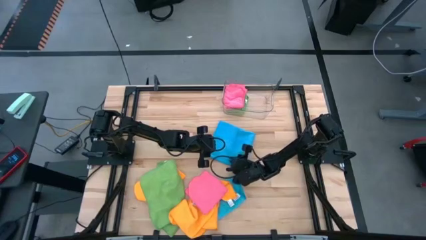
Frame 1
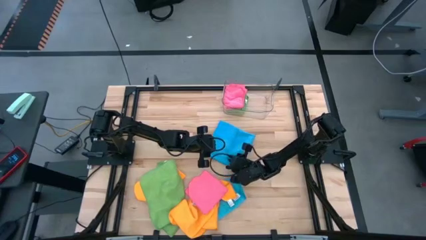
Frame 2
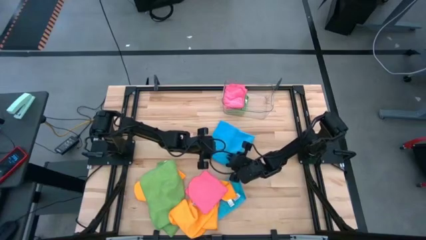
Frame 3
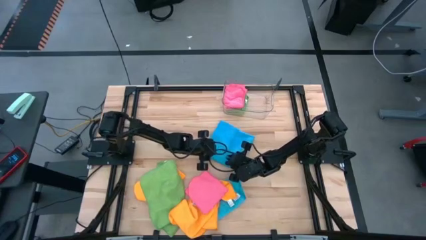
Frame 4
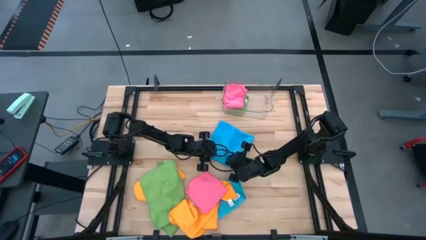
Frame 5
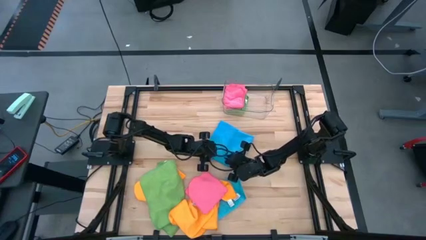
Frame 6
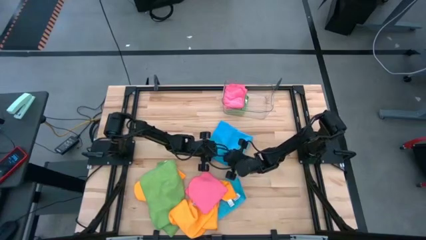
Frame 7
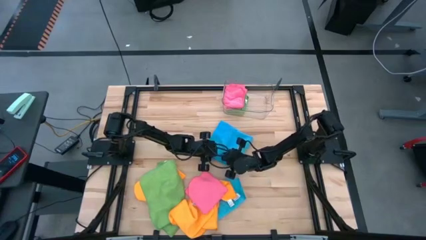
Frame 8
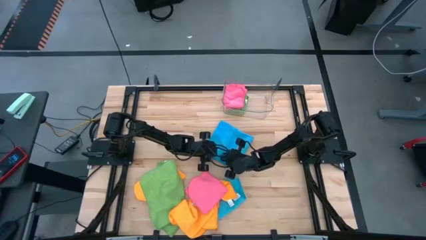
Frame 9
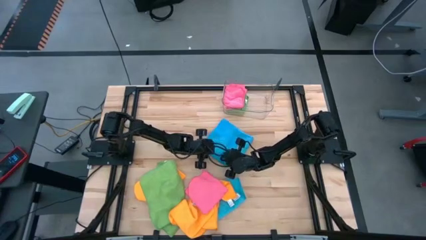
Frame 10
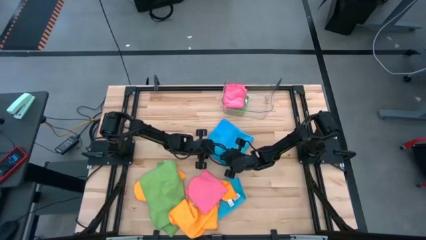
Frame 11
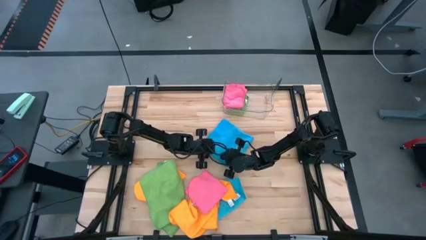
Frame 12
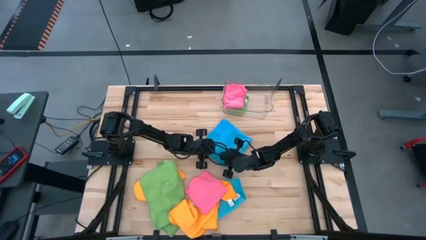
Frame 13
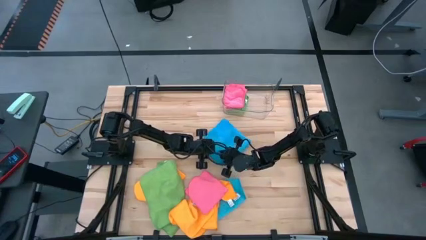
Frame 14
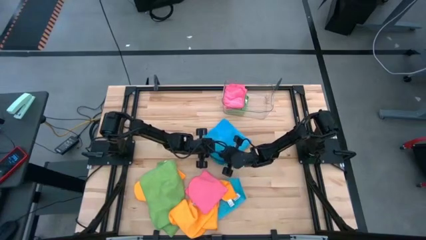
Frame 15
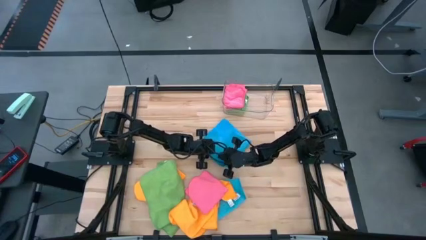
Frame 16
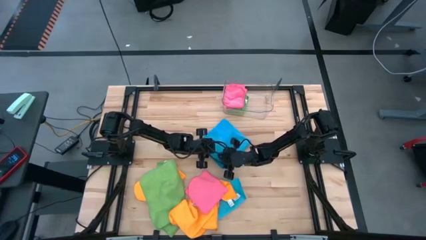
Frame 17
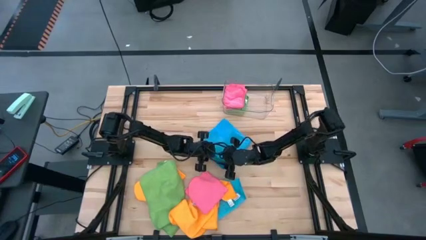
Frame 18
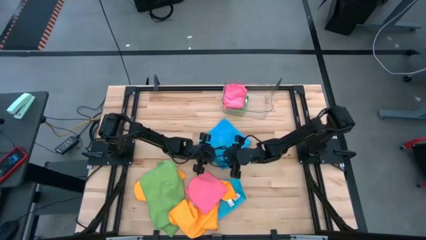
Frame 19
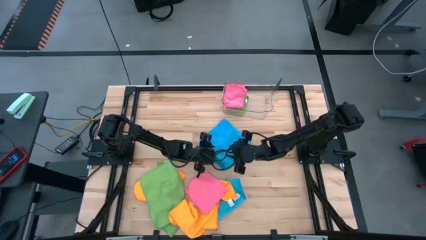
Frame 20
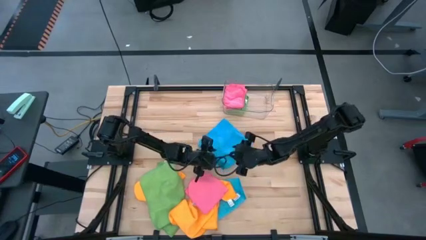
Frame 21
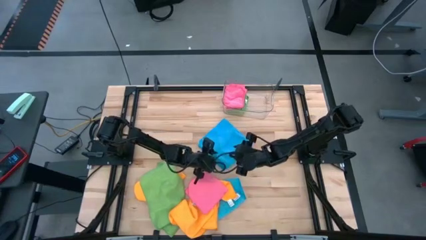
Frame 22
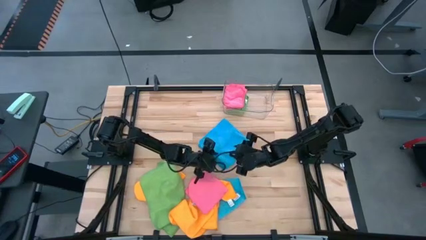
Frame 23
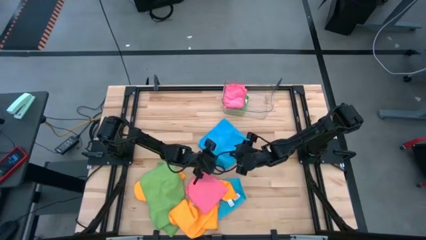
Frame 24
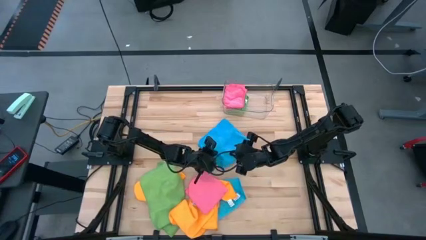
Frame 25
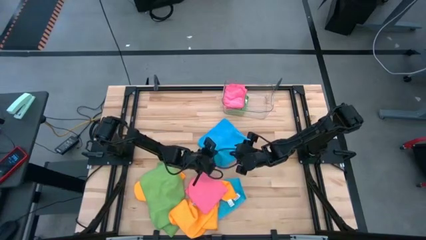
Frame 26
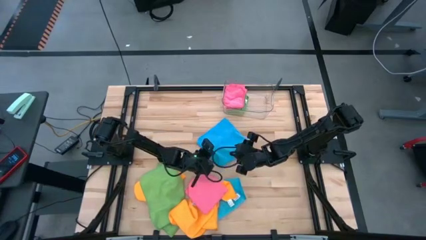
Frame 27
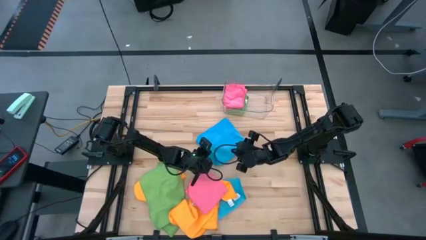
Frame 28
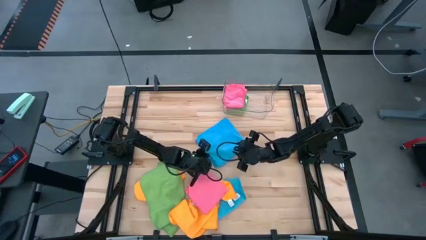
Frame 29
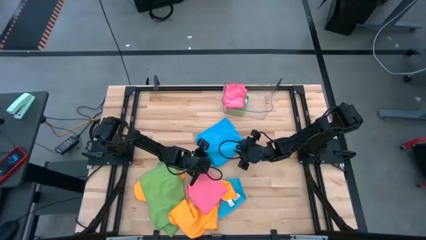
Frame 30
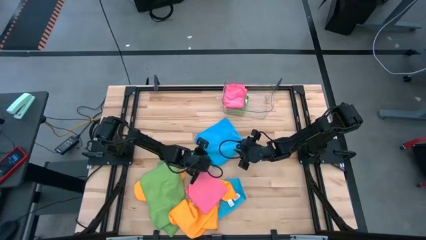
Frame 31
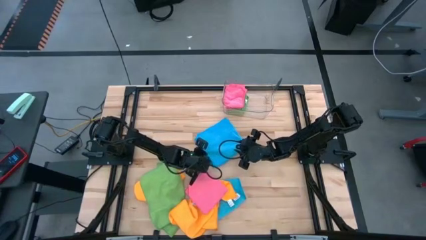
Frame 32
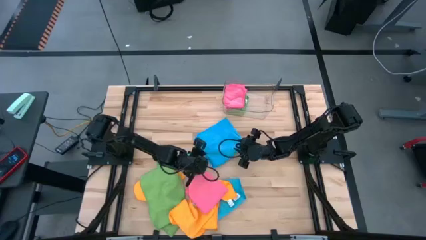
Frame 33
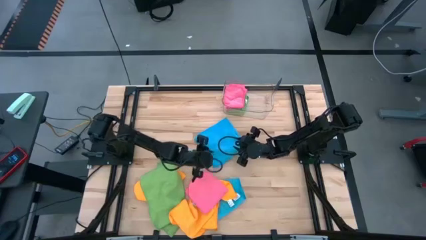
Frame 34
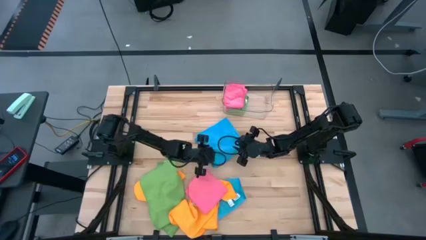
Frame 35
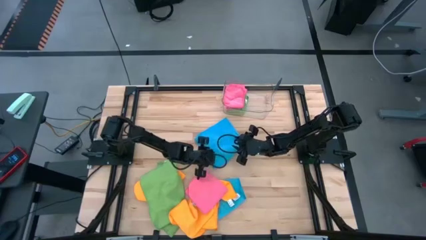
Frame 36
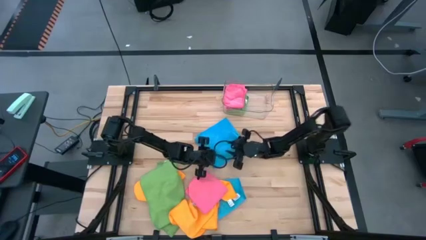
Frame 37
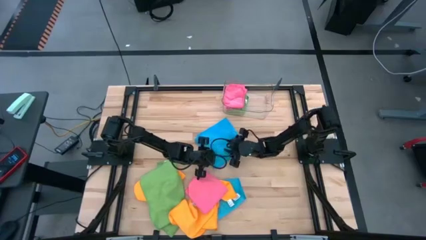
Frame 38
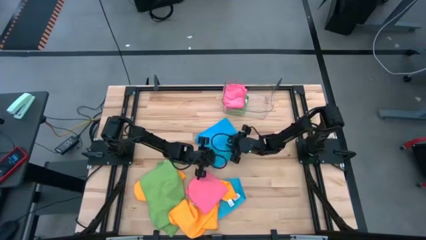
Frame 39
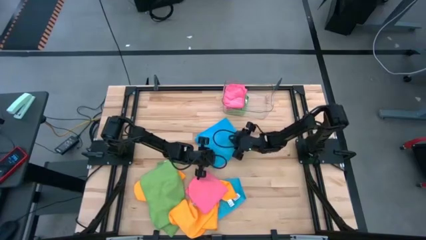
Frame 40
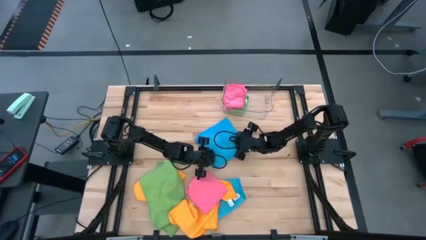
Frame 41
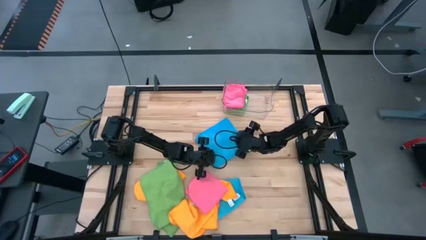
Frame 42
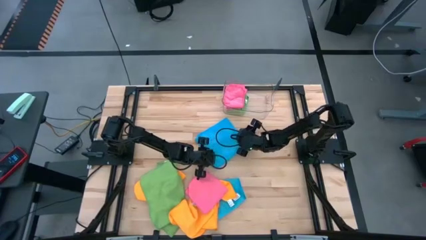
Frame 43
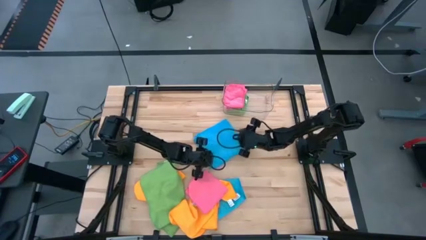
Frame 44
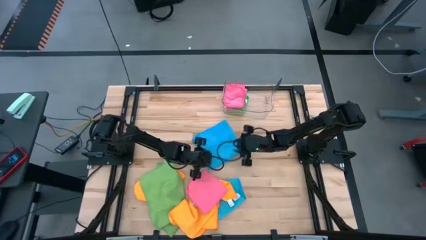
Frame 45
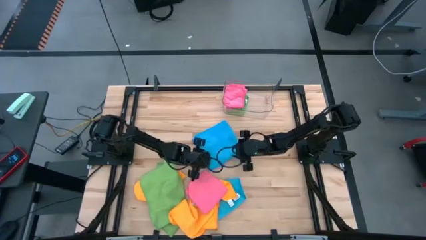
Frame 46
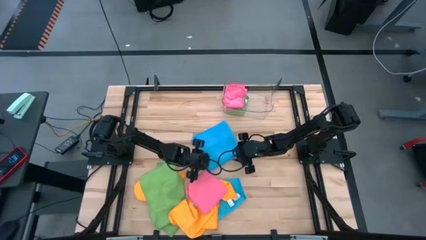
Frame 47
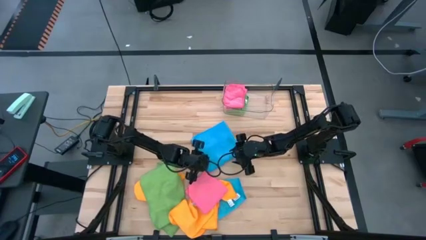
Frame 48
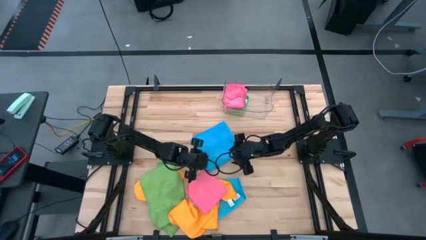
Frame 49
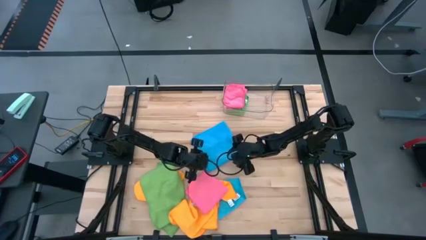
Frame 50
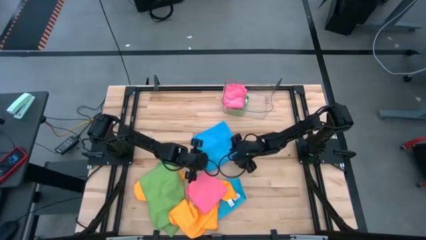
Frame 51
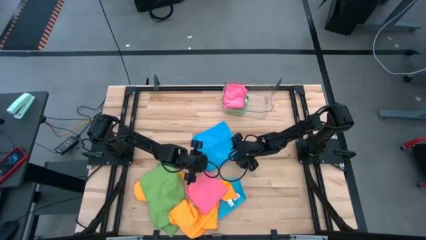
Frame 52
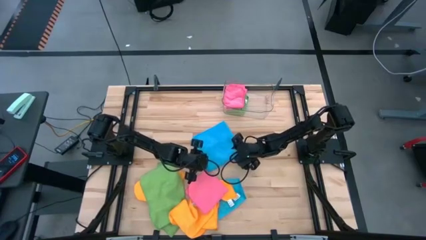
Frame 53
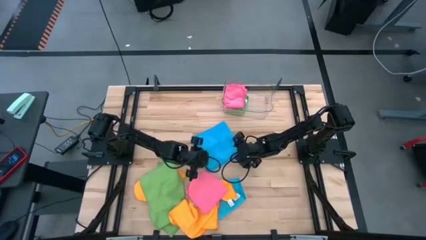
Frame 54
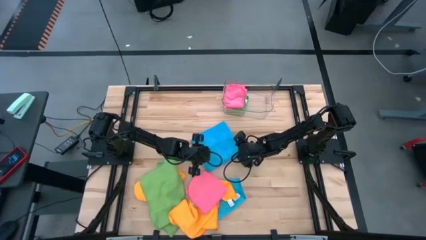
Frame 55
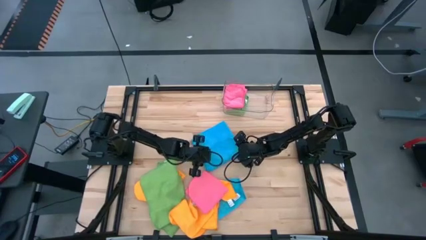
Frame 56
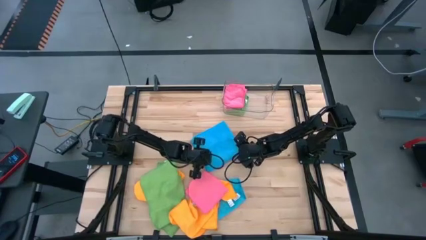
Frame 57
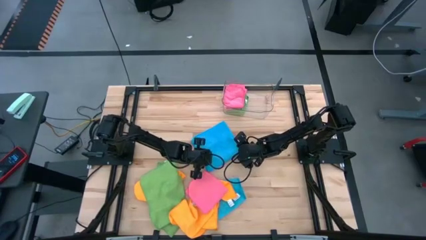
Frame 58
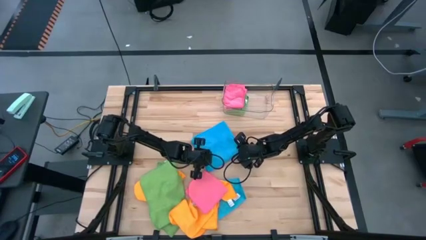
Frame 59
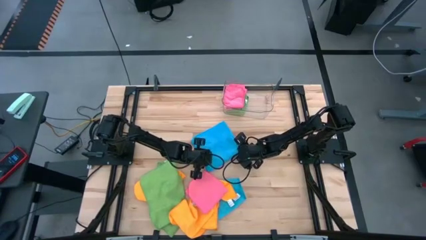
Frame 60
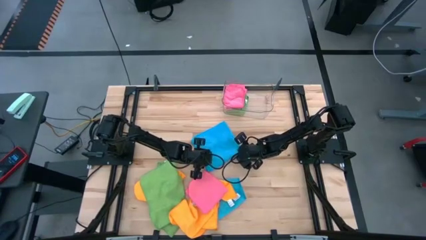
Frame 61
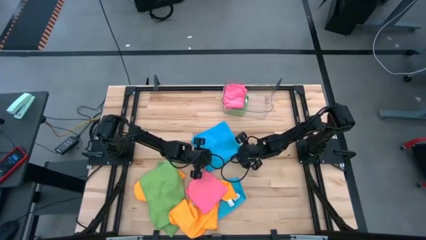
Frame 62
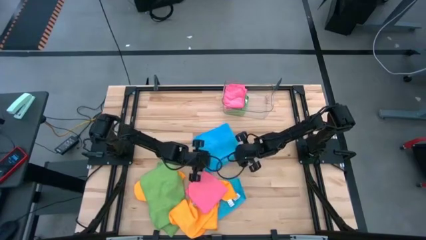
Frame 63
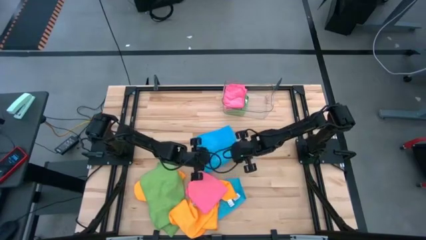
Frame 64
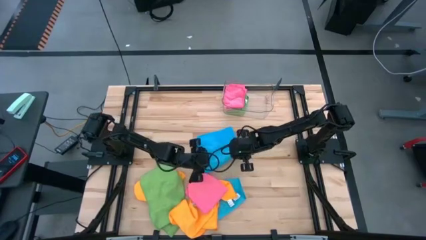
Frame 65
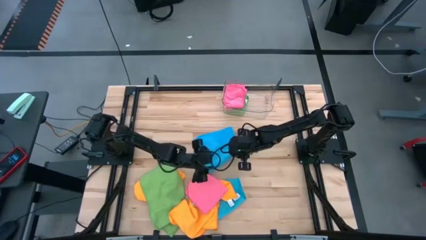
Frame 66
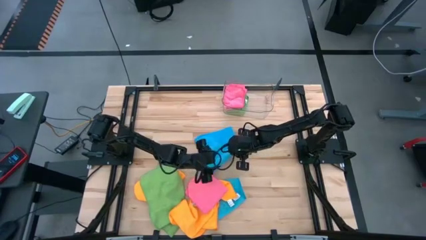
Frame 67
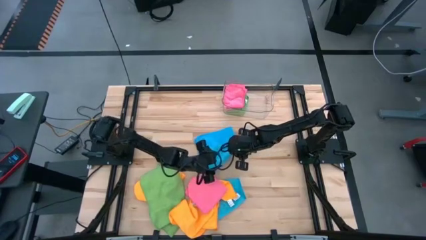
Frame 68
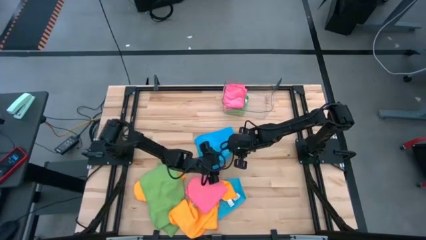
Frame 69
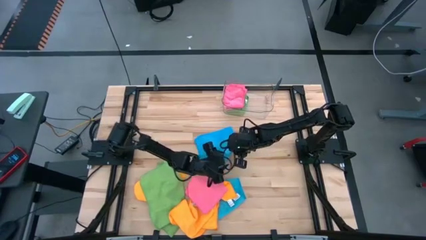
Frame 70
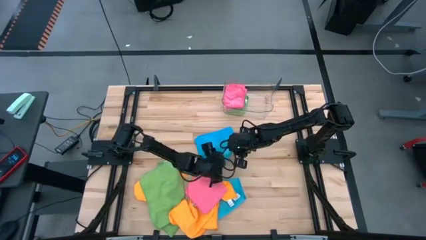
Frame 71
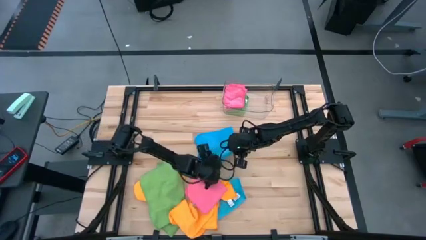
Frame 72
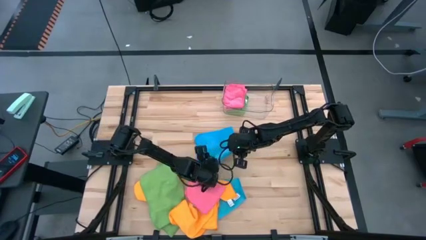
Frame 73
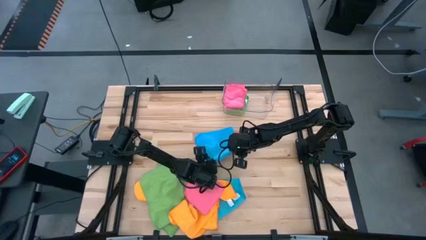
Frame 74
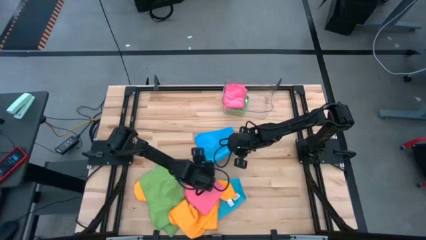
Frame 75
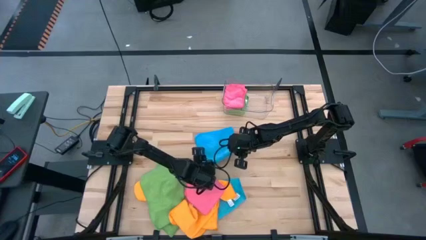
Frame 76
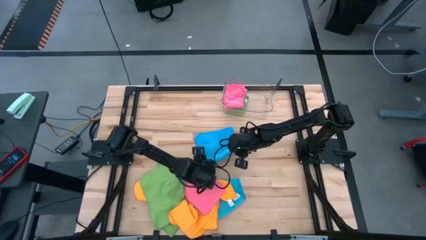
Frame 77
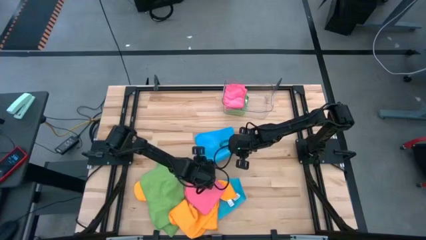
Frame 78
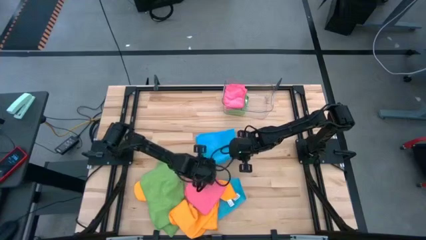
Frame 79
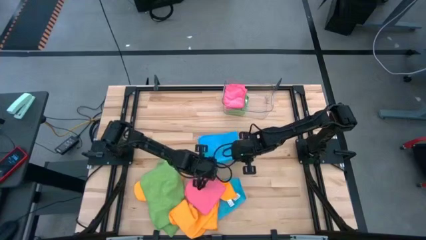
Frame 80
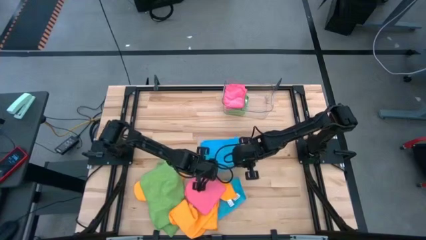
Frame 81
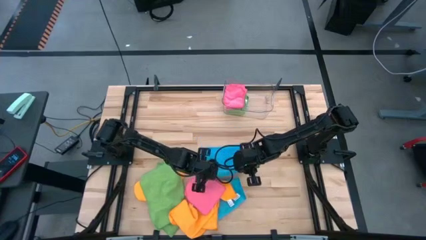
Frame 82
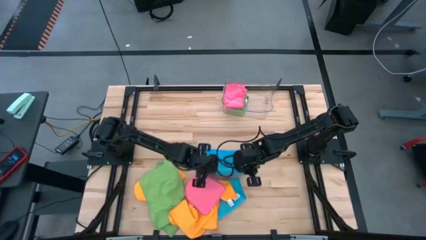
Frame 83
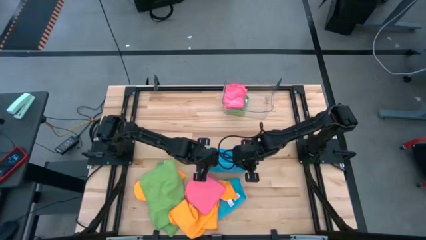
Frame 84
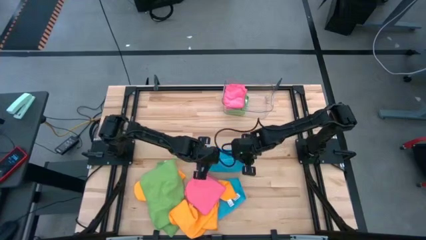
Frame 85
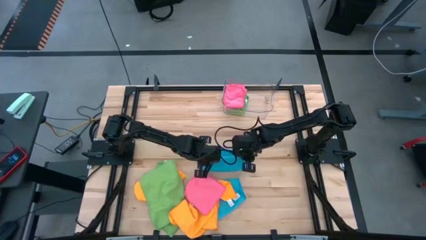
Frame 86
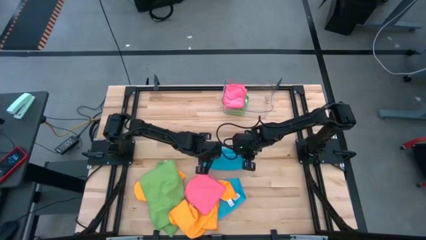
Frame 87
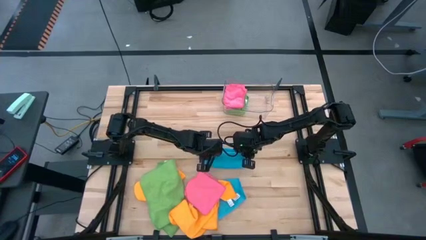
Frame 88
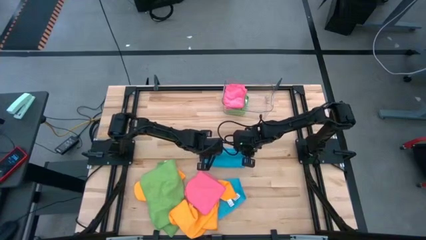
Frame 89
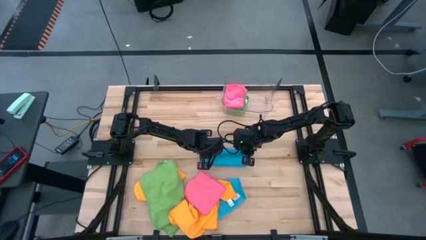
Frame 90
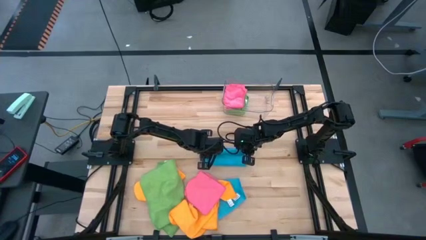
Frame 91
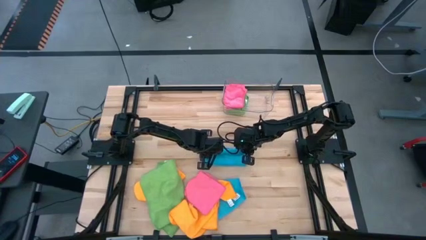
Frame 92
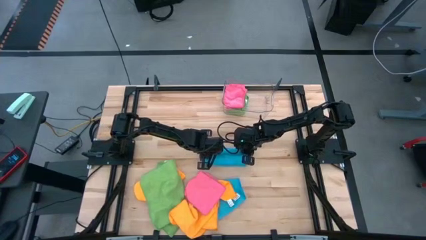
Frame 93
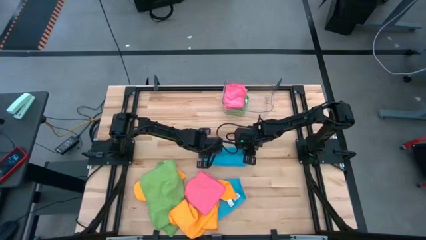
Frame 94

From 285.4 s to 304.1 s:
Task: Fold microfiber towels
Fold the top blue towel
